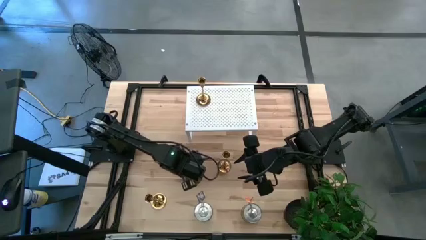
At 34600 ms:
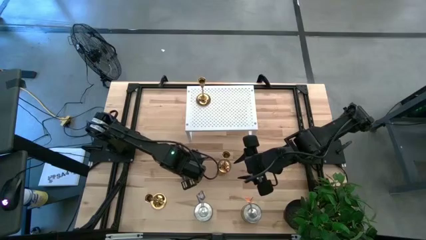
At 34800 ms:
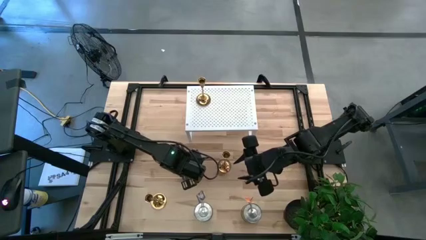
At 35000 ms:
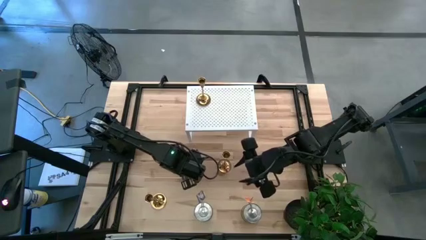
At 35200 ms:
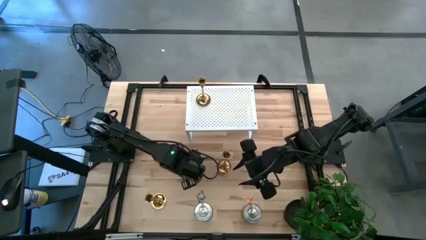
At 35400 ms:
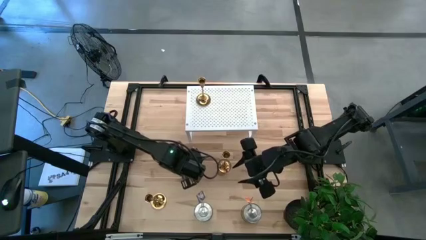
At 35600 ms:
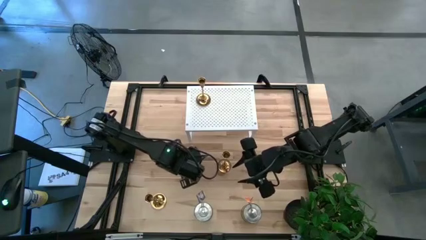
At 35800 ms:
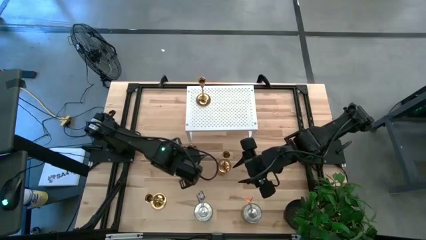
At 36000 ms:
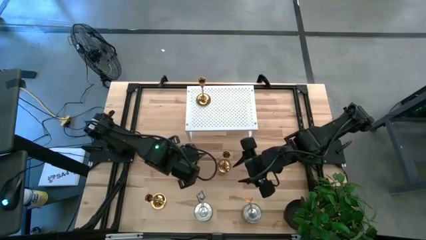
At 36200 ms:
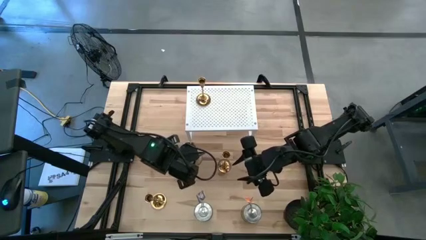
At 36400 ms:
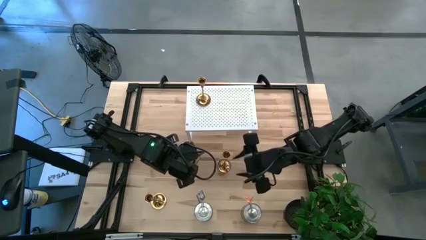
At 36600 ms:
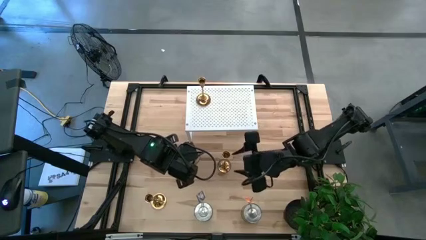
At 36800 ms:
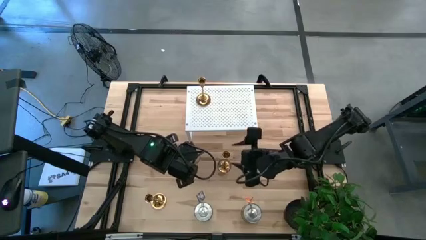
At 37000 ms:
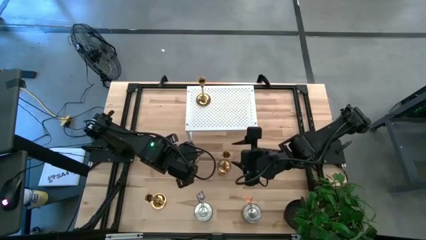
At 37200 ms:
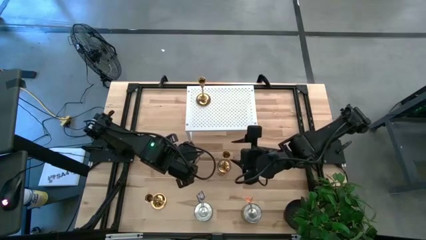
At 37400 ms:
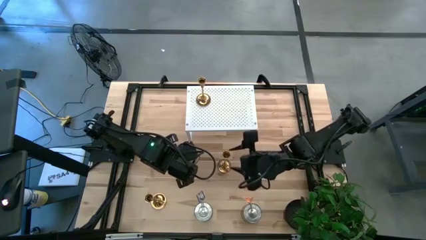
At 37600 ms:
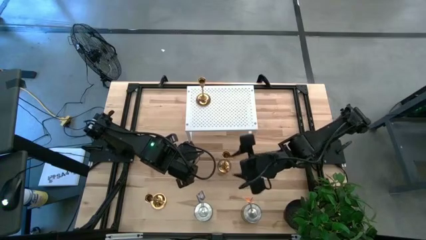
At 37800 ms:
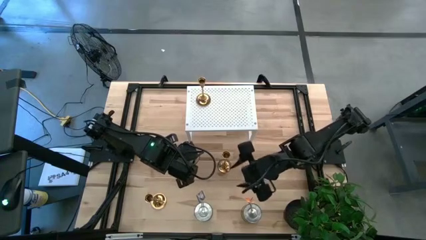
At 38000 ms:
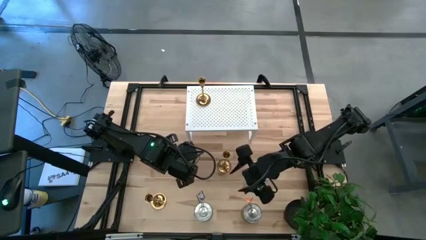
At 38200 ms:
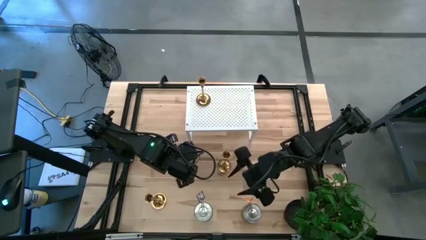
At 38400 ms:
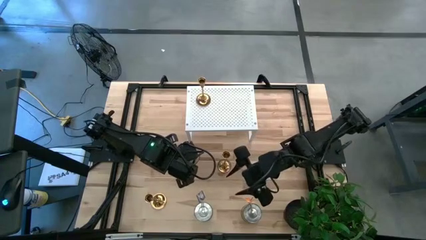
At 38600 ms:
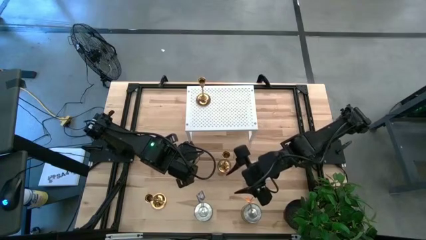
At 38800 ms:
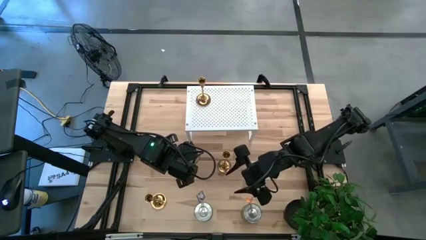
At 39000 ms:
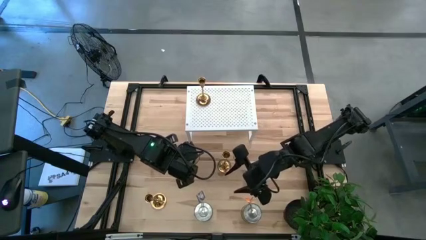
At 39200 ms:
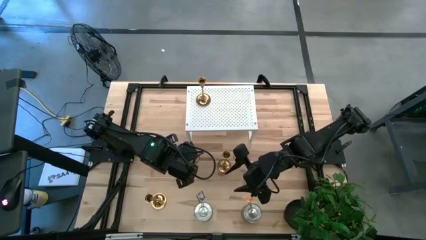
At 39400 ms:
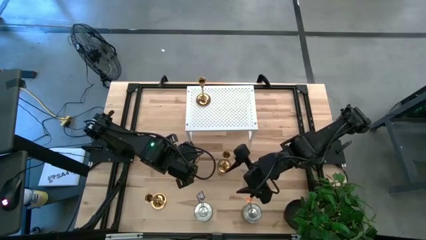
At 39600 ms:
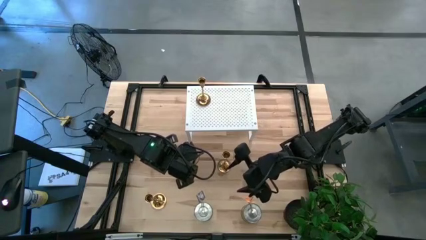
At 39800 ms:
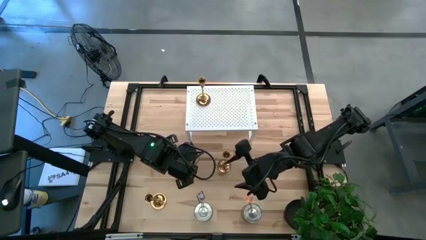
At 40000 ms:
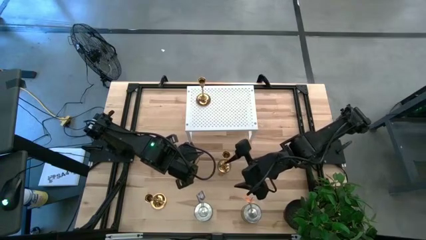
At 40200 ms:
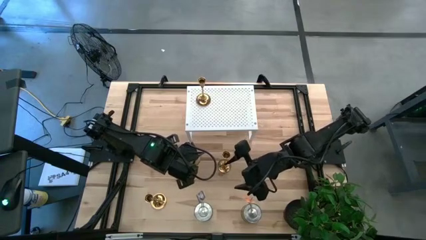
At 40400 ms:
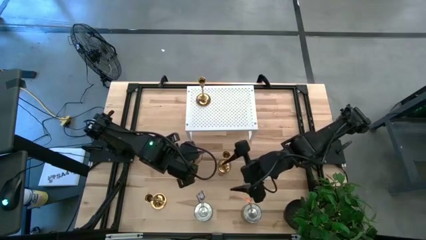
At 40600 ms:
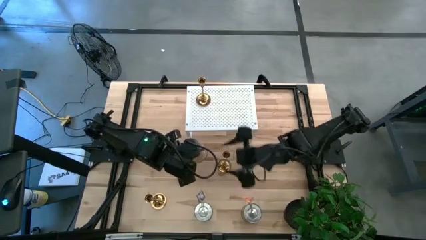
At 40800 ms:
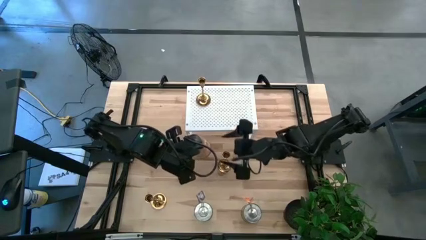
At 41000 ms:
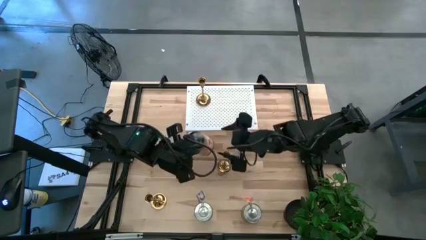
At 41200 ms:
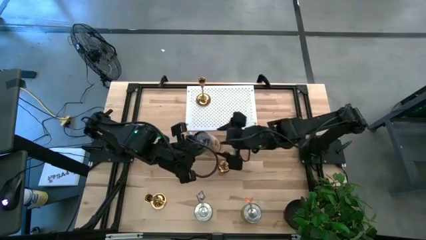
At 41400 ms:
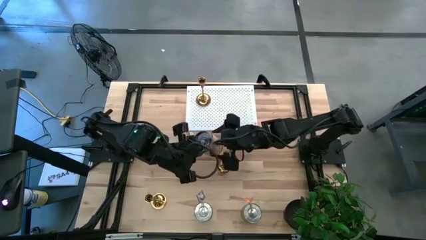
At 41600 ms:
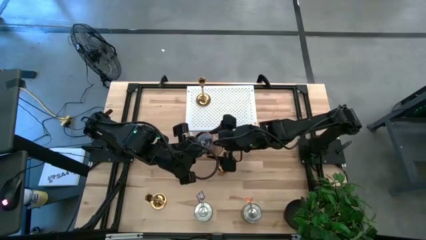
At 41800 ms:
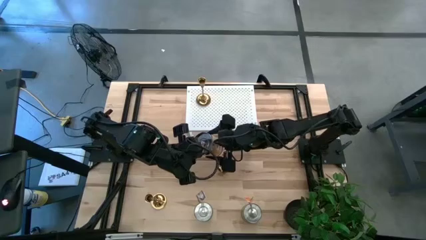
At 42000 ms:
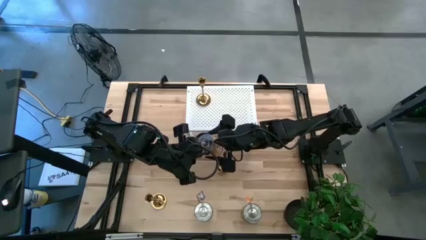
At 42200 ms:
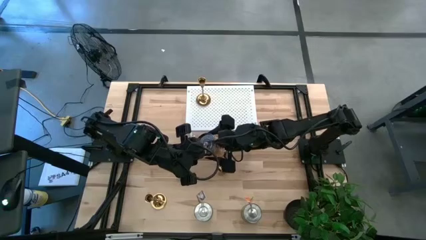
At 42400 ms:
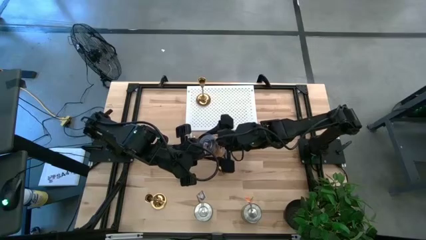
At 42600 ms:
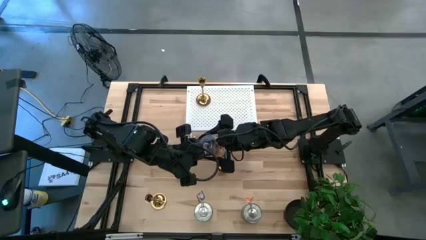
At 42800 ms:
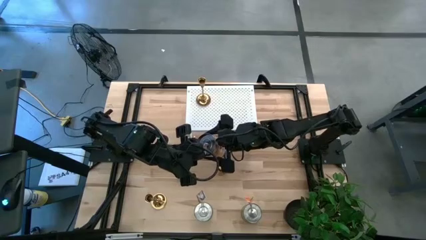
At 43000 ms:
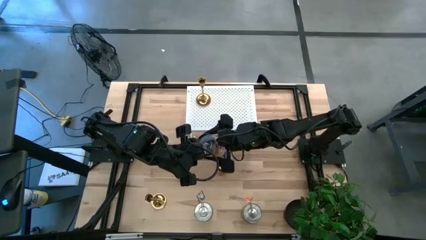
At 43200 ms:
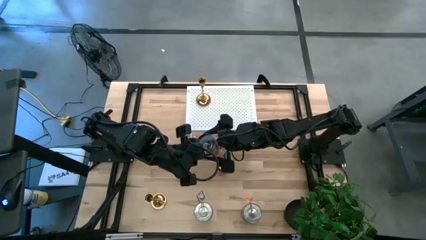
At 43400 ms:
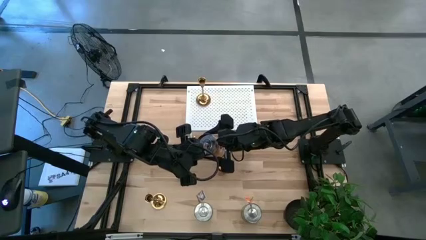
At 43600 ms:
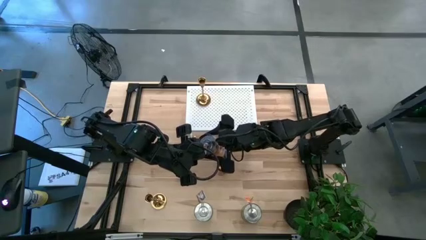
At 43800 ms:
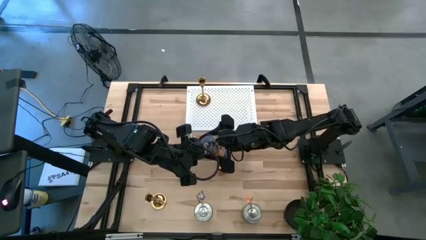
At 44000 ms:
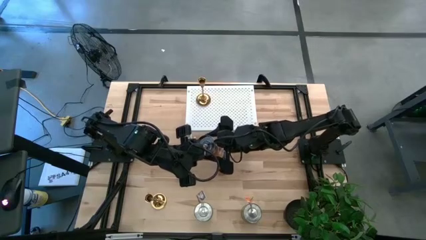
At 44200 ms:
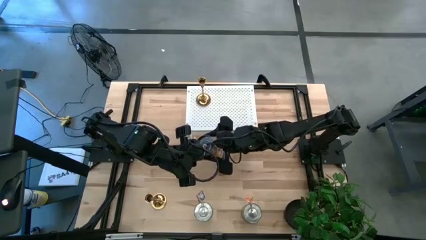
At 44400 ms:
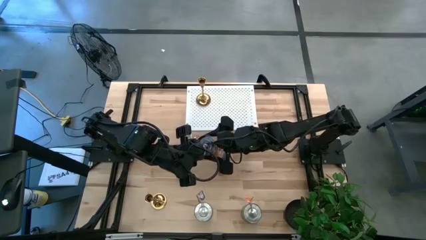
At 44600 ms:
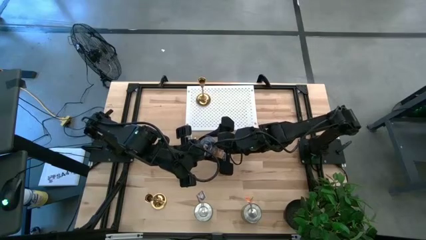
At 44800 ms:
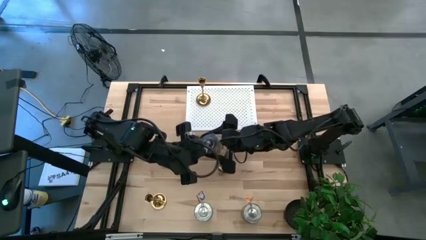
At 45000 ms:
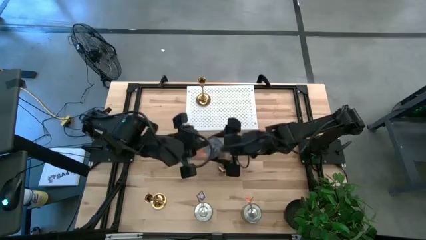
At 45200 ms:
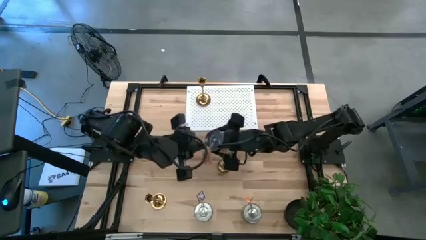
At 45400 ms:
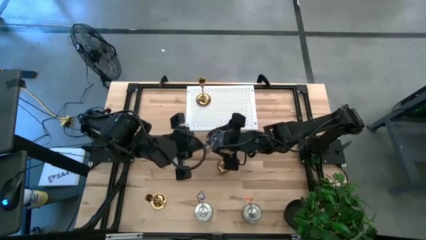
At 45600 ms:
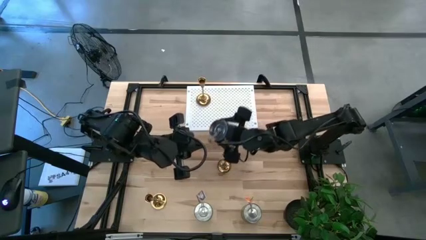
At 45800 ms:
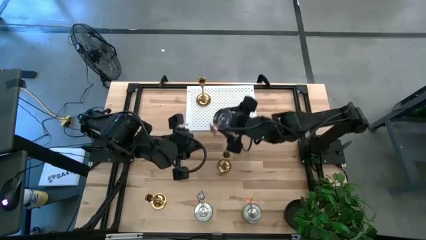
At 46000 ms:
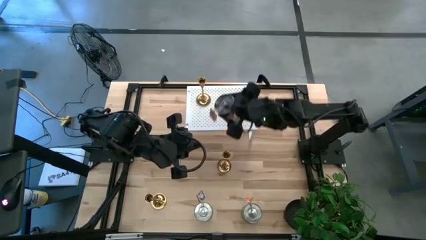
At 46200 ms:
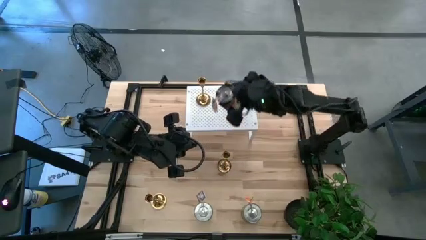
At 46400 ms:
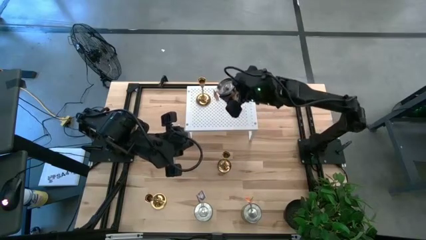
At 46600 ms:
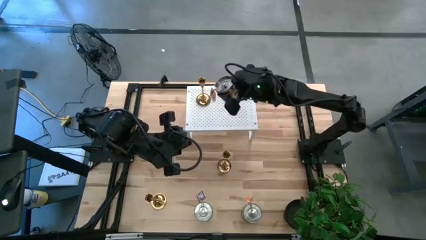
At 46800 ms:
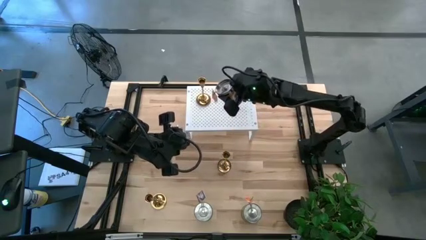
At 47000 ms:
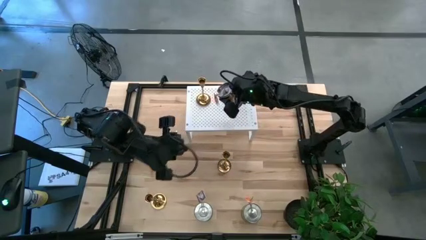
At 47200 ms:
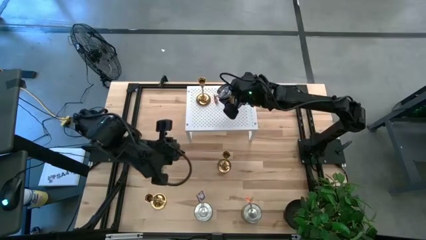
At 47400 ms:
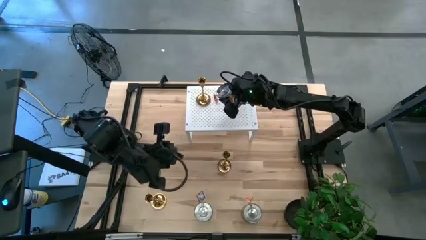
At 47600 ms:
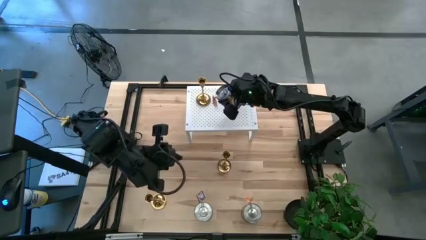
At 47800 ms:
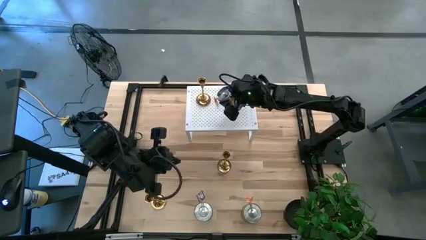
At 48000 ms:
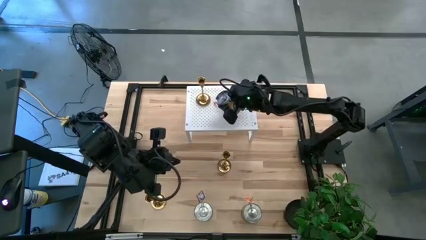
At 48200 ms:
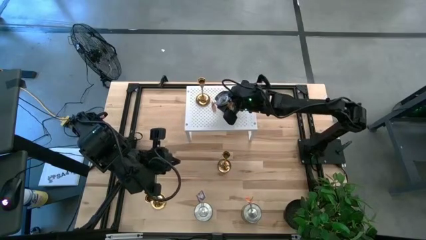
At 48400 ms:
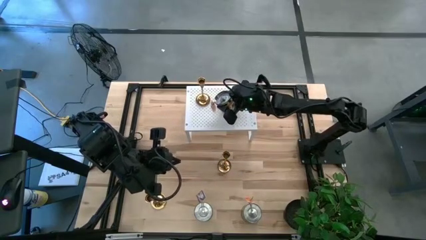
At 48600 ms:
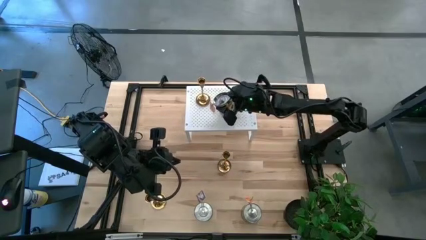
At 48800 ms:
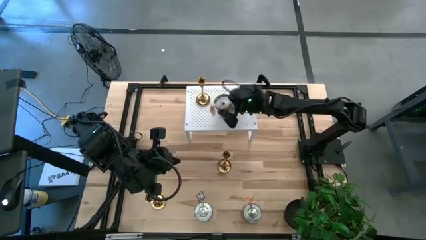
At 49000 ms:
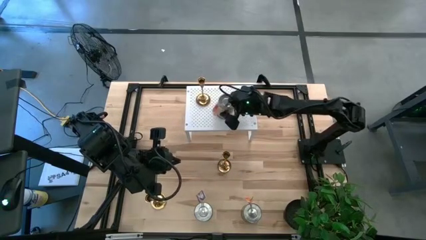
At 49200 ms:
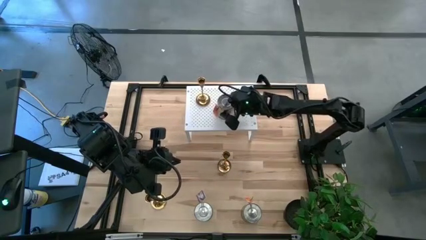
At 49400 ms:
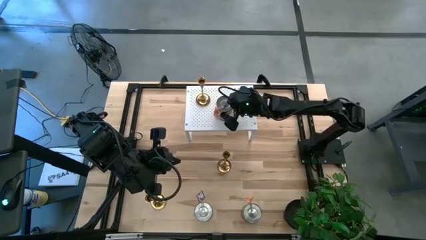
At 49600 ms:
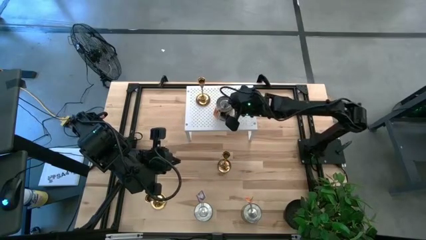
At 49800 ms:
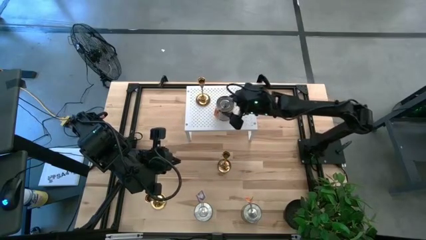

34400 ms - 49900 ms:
Task: Pick & Place candle stick holders
Put the top left silver scented candle on the shelf
